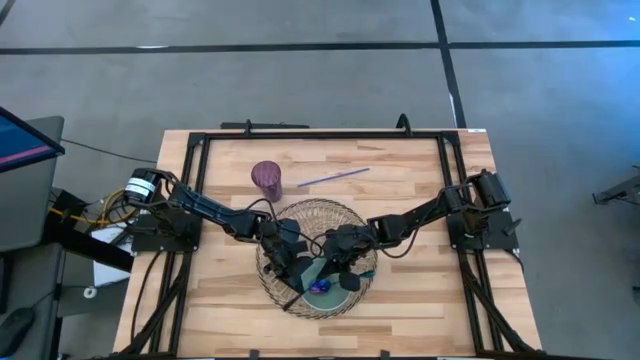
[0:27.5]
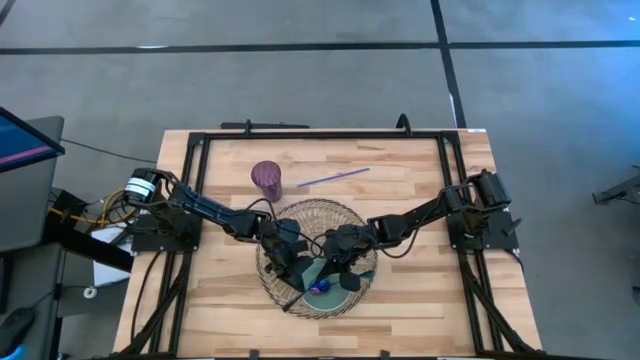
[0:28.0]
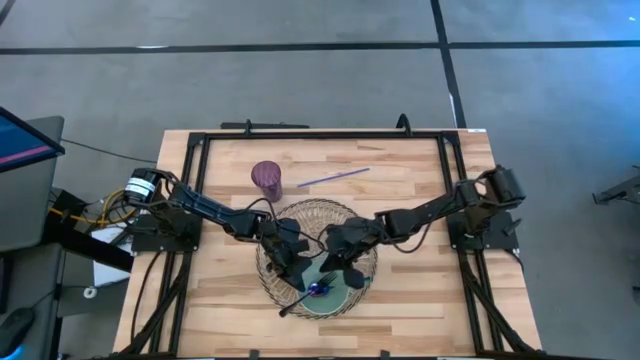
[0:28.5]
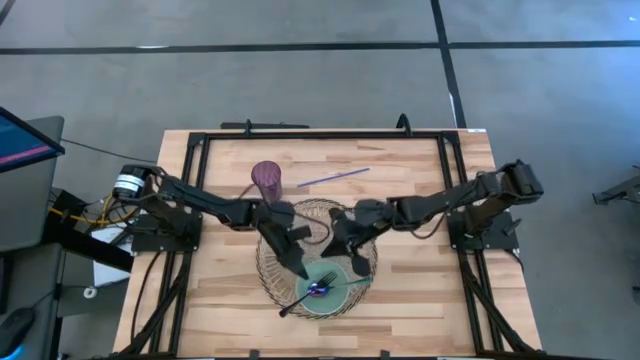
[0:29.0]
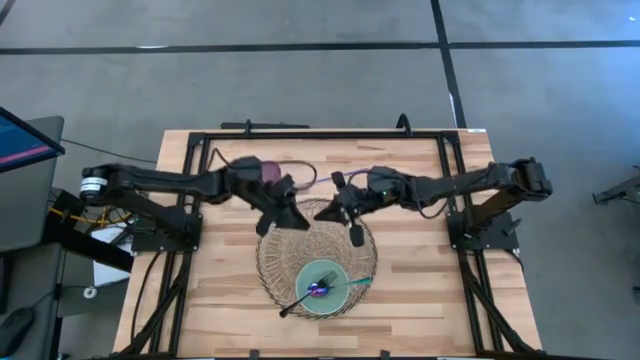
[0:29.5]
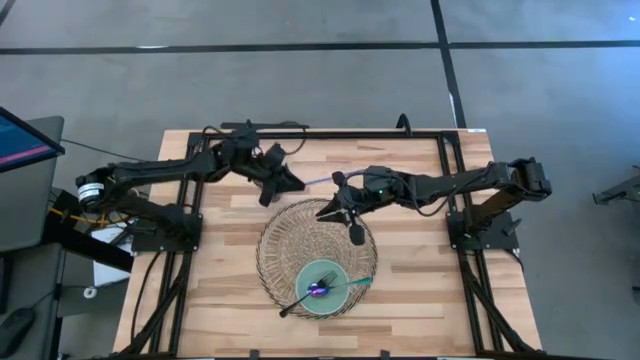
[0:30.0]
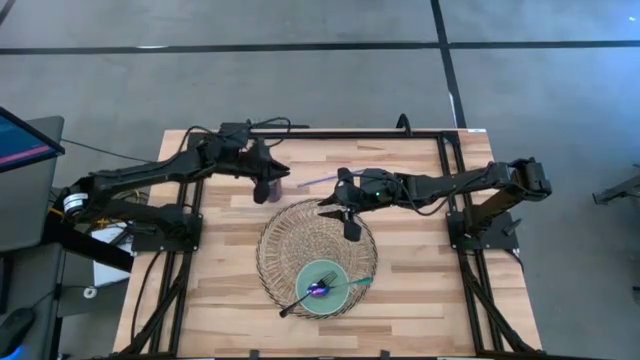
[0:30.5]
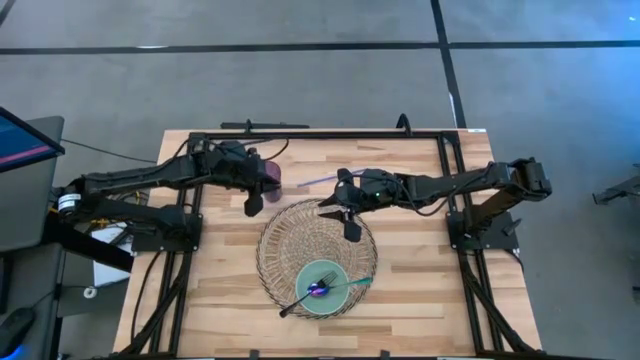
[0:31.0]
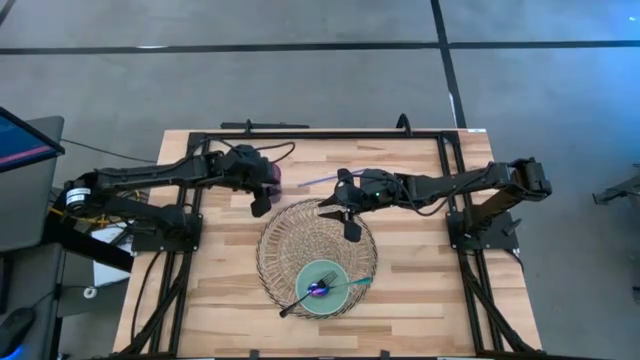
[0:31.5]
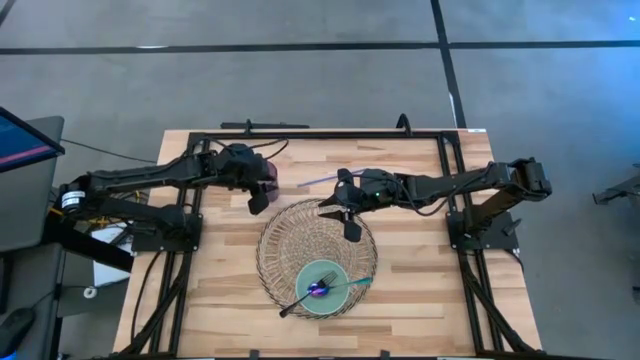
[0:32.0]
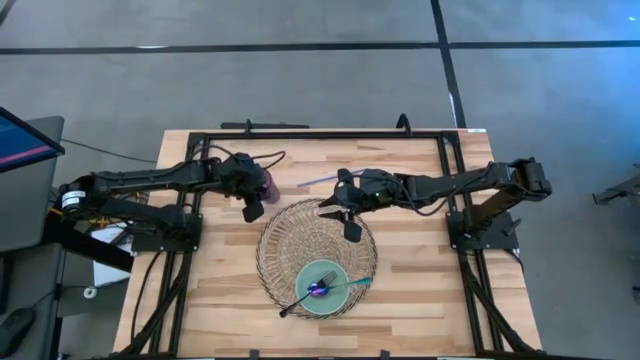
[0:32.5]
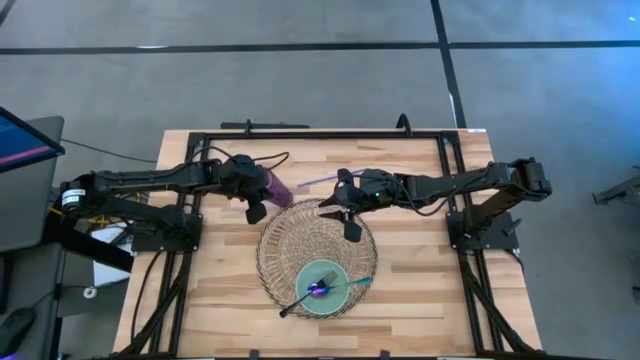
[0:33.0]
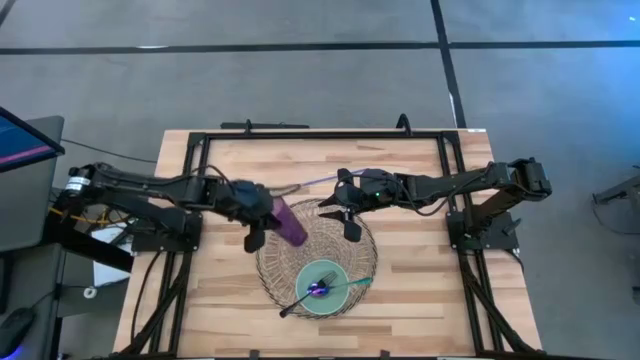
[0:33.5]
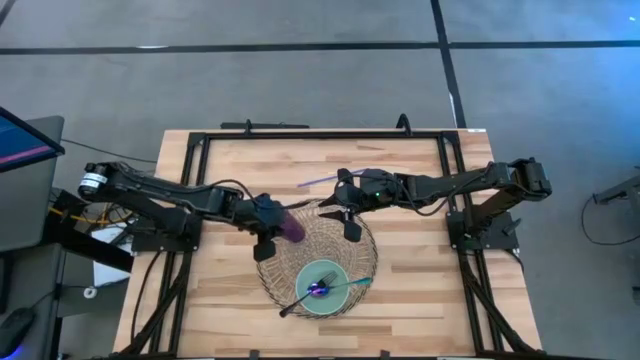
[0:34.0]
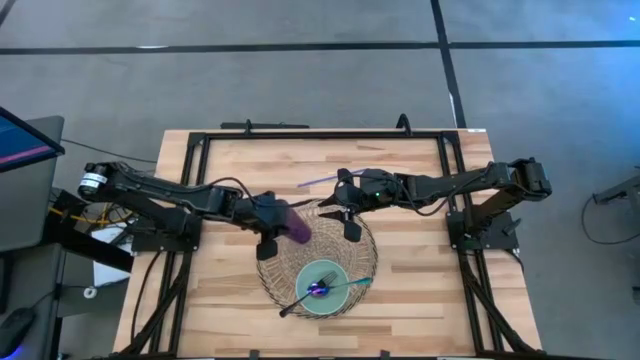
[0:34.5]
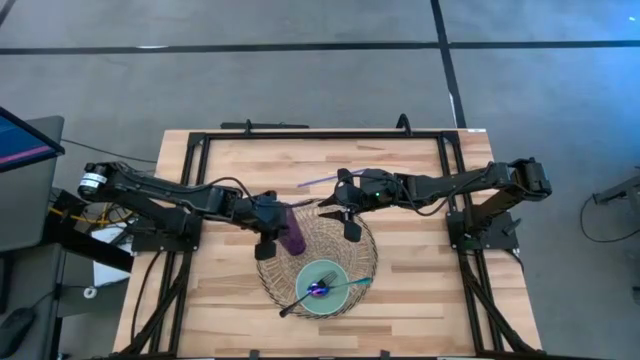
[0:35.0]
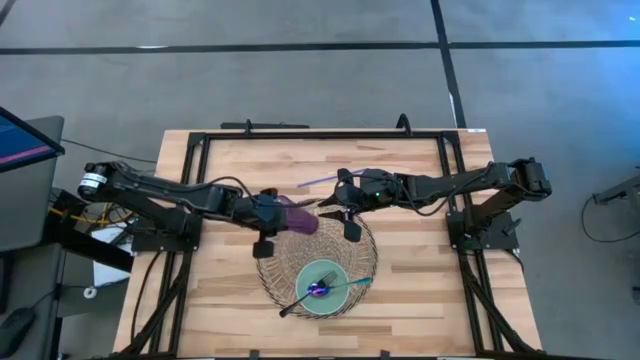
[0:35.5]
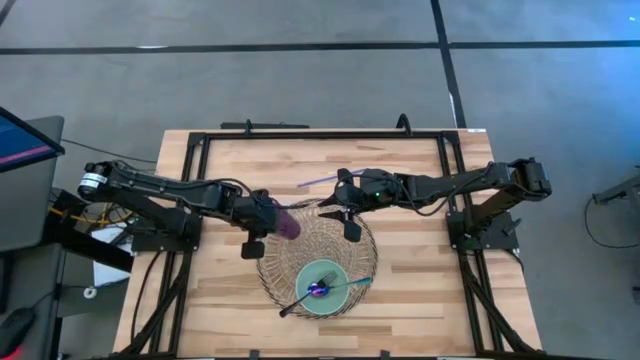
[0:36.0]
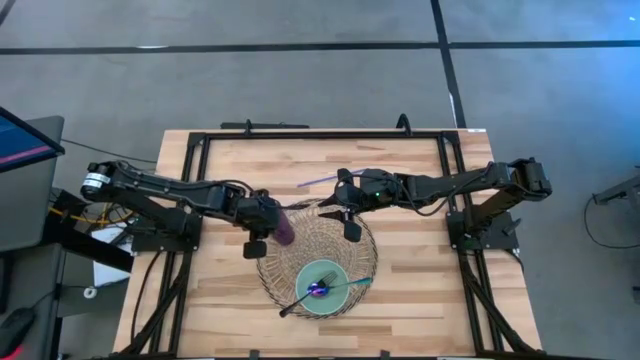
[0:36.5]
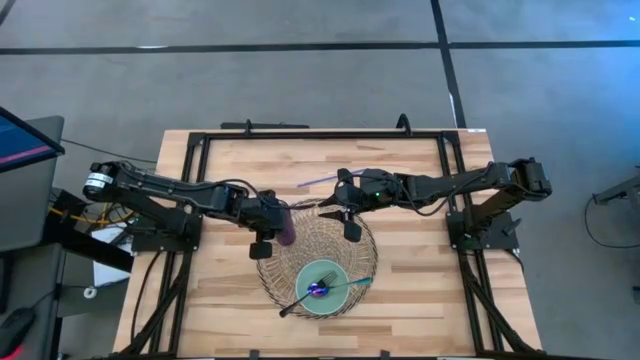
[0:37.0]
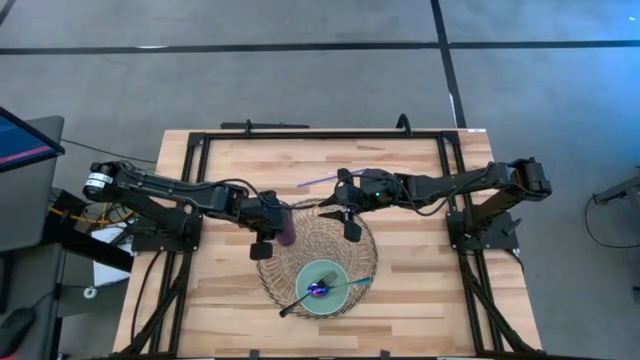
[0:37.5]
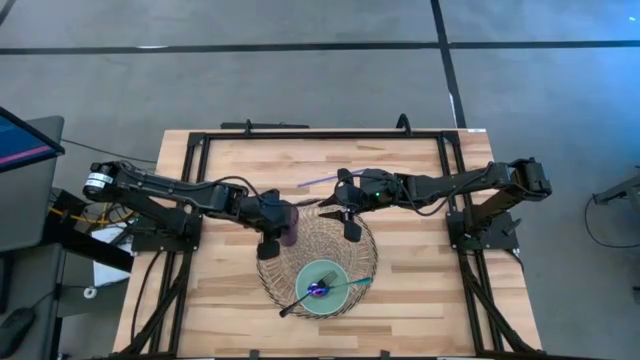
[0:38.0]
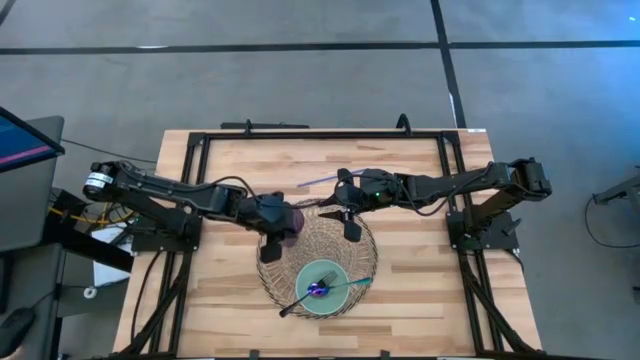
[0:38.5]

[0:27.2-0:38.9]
Task: Pick & Place Utensil
Put the violet cup to the top left of the table mat

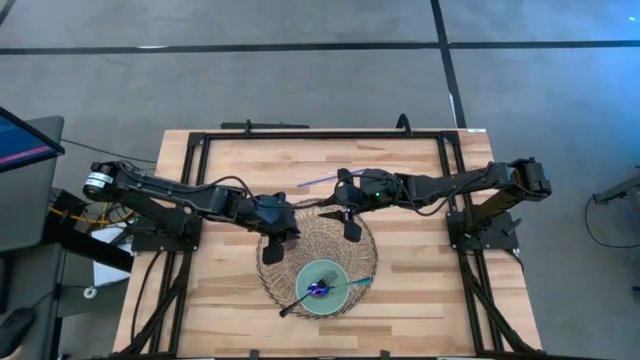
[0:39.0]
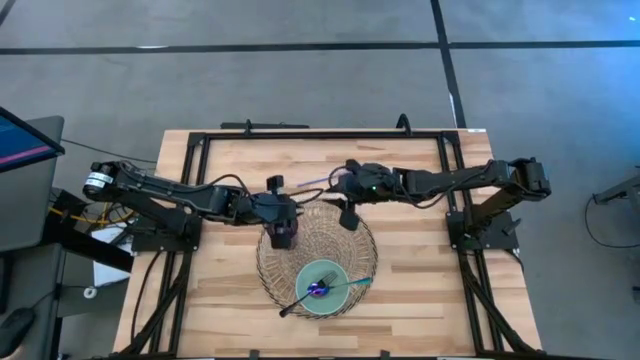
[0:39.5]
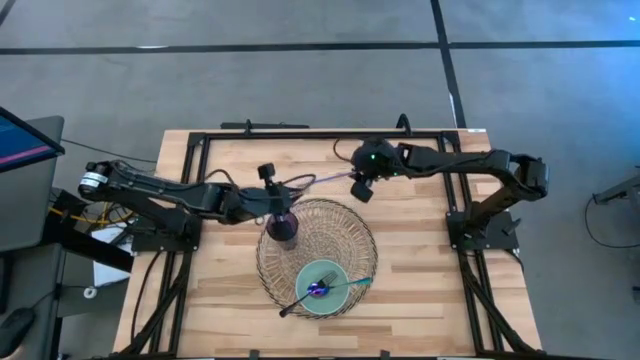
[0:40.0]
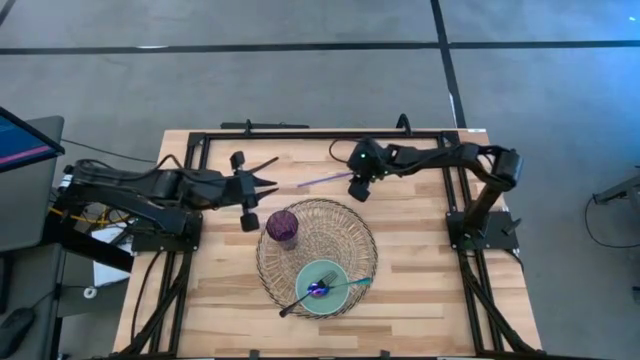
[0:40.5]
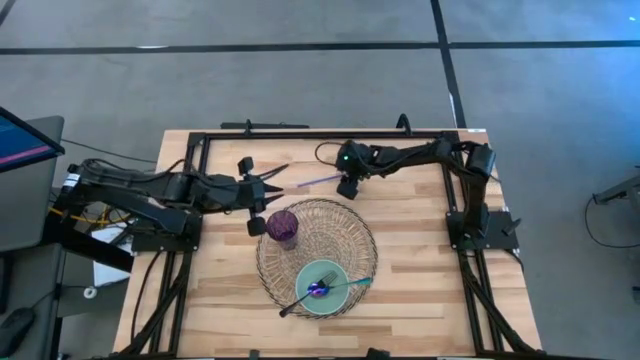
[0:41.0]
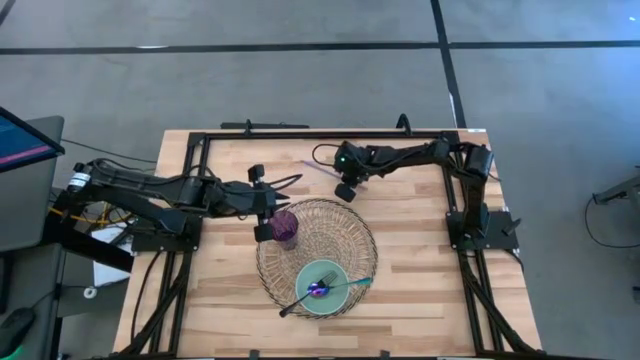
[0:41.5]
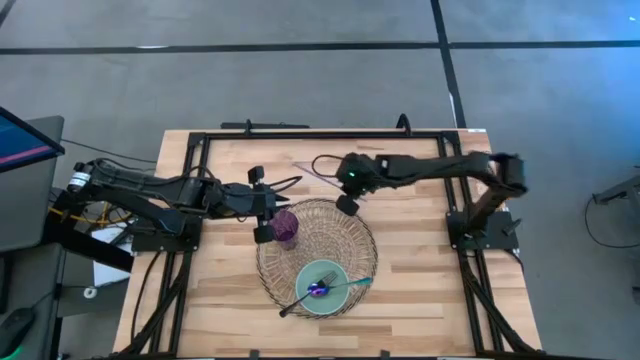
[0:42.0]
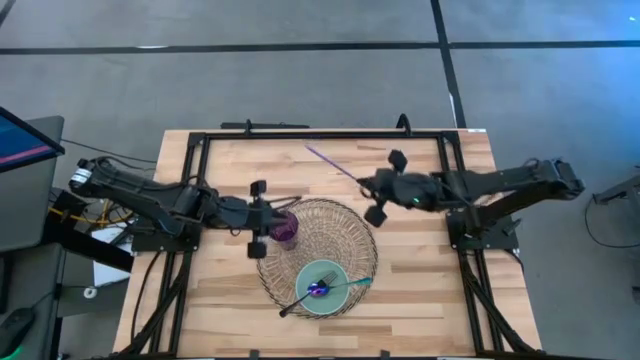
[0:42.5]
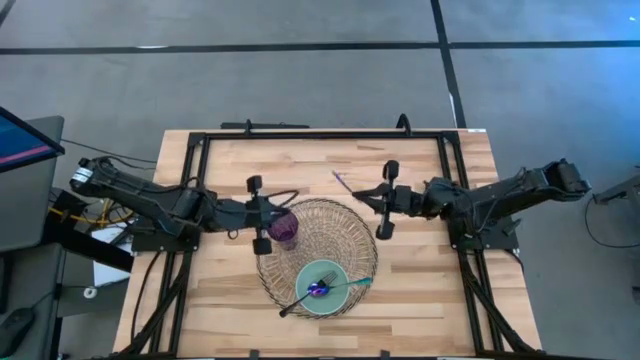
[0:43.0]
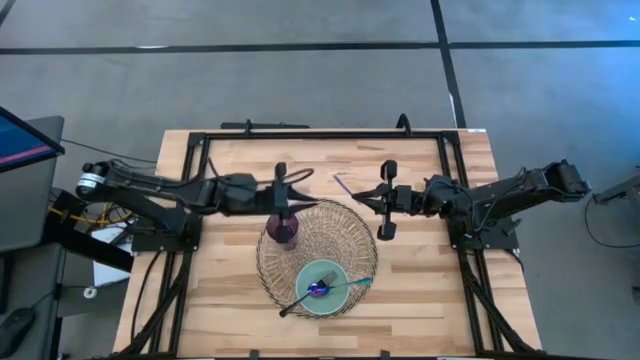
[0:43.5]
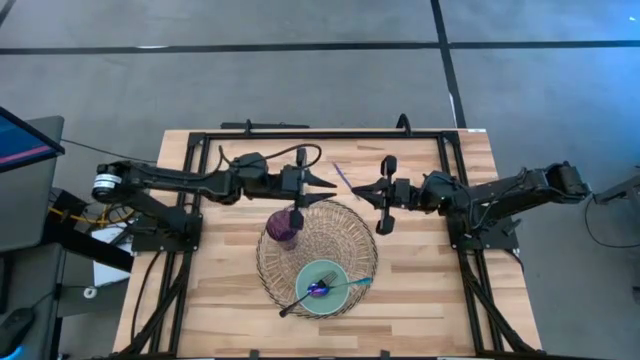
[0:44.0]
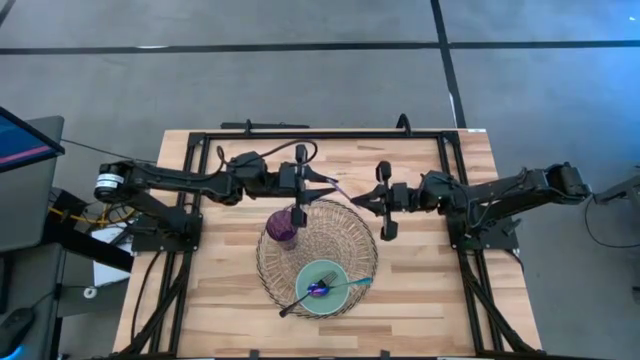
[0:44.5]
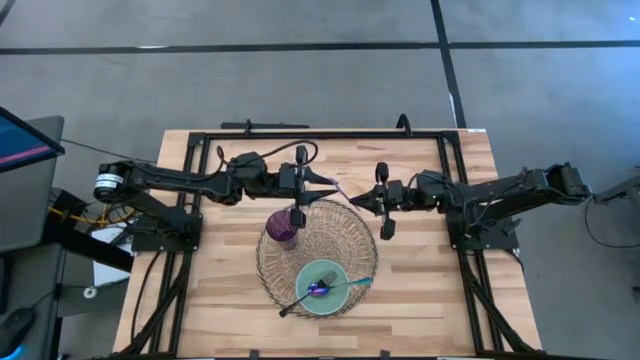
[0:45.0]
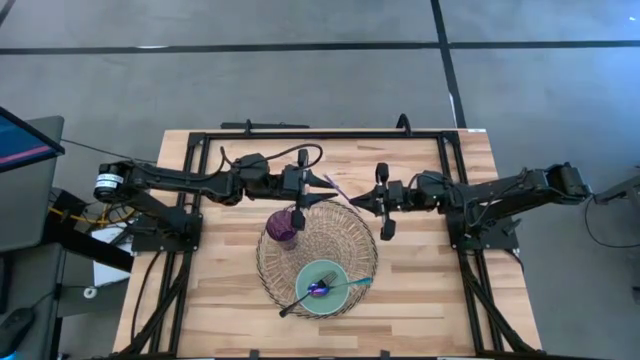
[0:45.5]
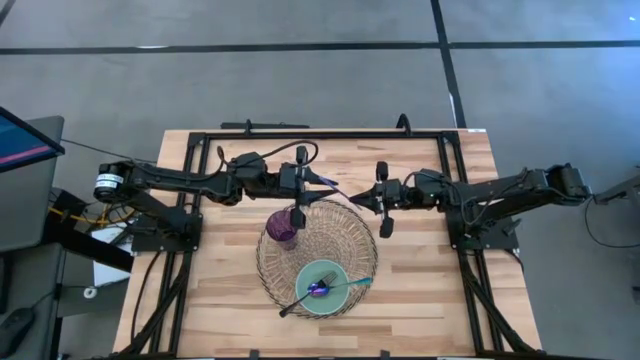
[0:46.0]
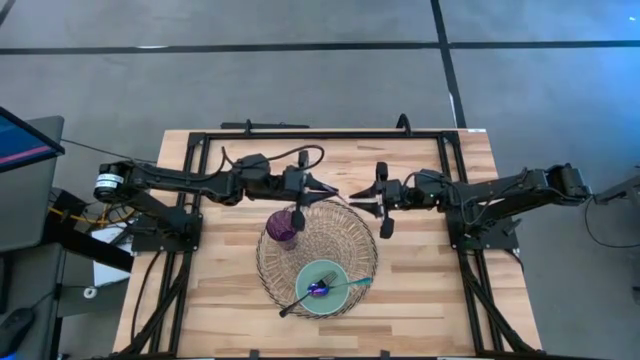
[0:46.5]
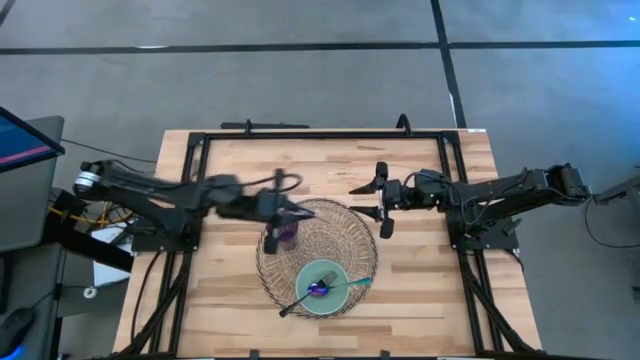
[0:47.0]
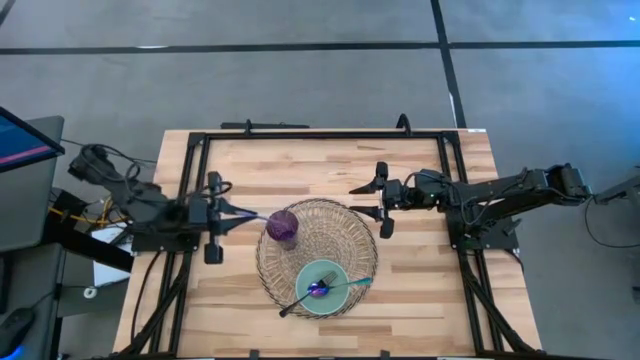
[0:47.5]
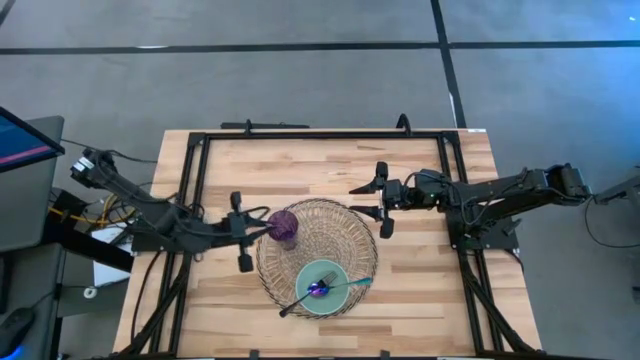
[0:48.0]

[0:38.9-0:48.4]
Put the straw into the violet cup
